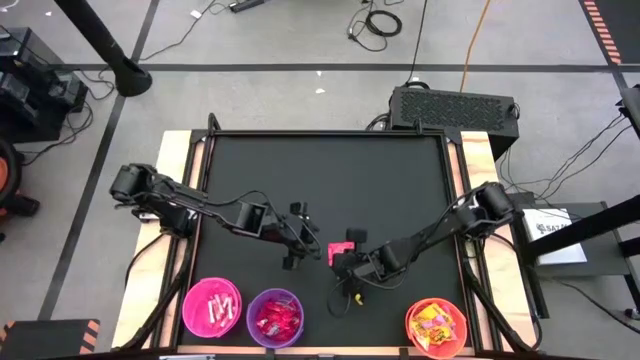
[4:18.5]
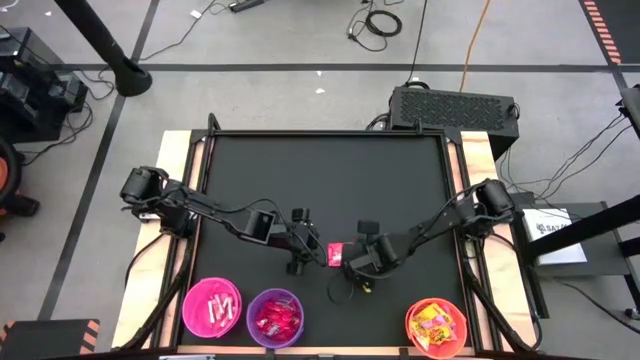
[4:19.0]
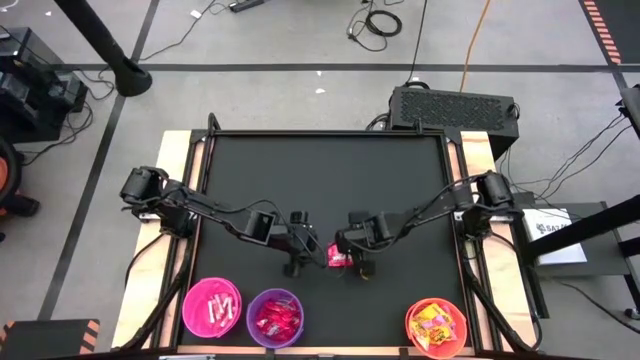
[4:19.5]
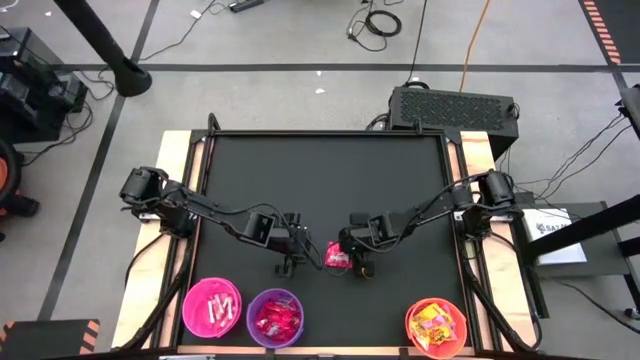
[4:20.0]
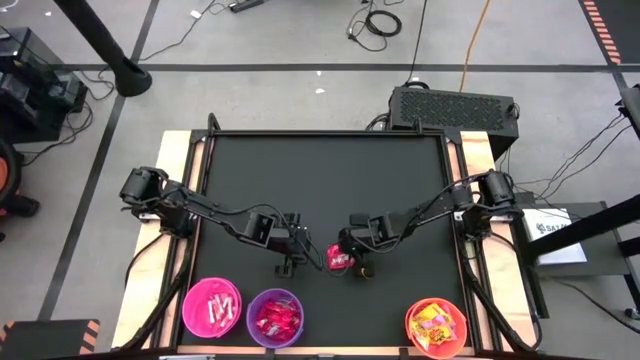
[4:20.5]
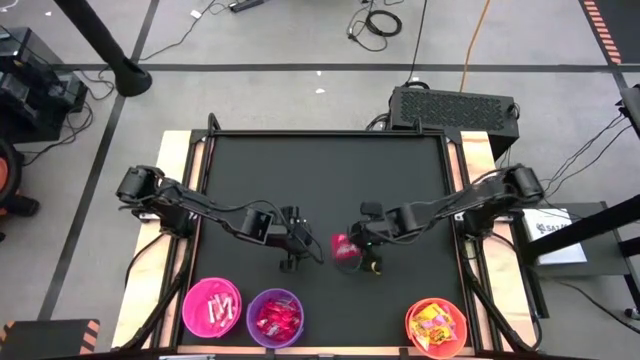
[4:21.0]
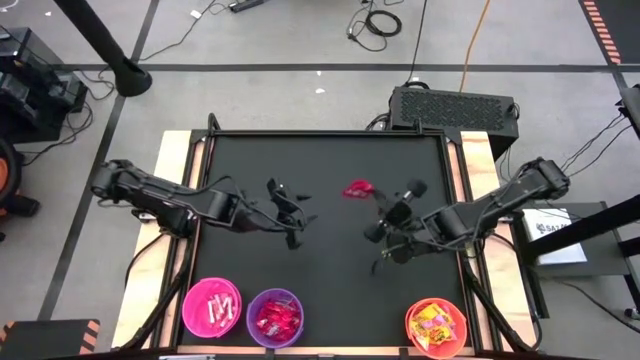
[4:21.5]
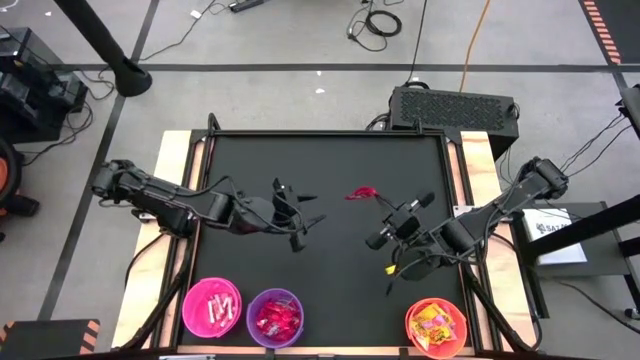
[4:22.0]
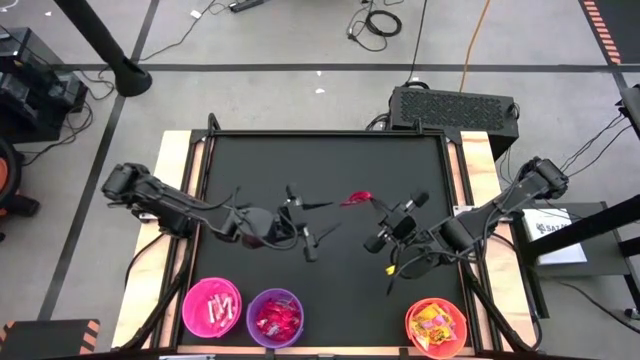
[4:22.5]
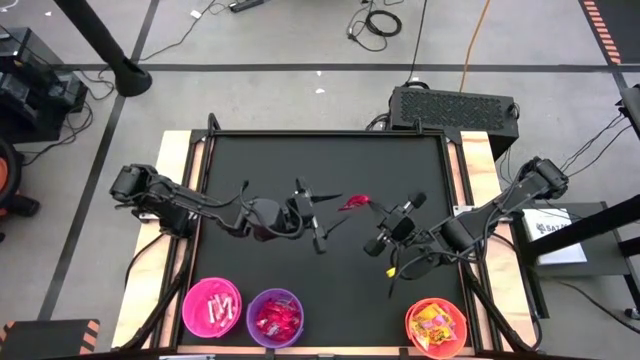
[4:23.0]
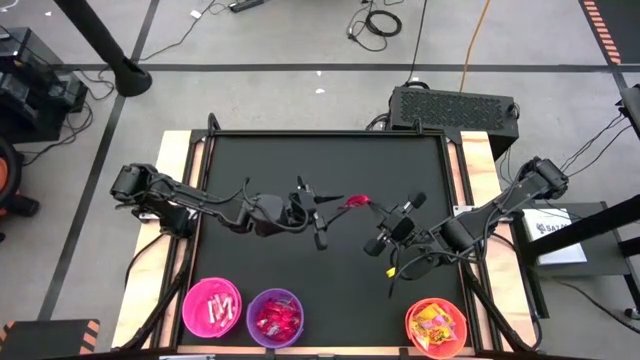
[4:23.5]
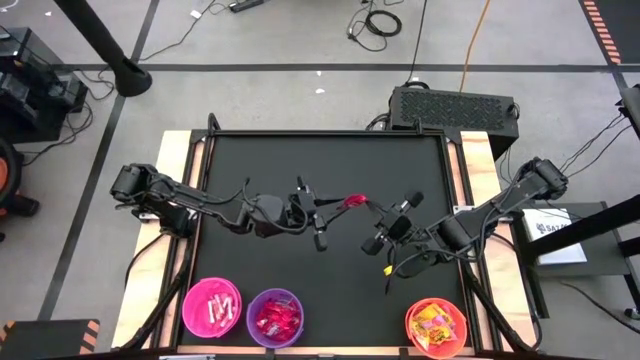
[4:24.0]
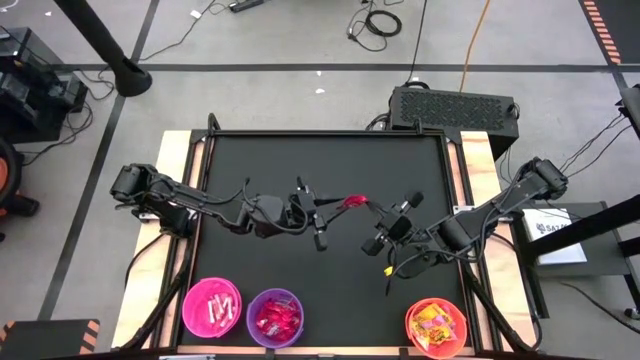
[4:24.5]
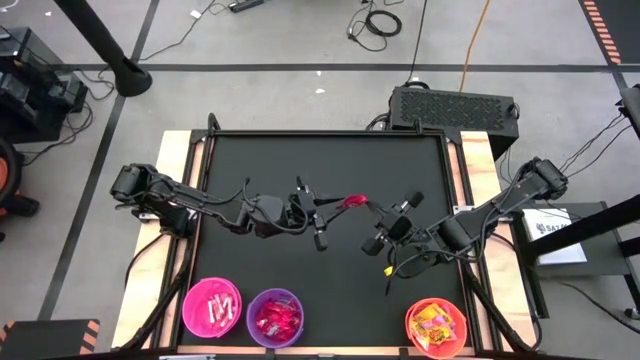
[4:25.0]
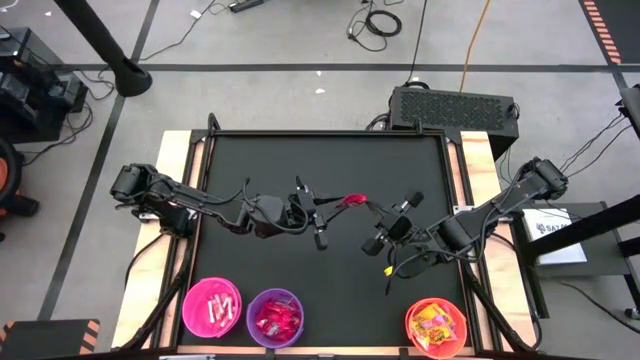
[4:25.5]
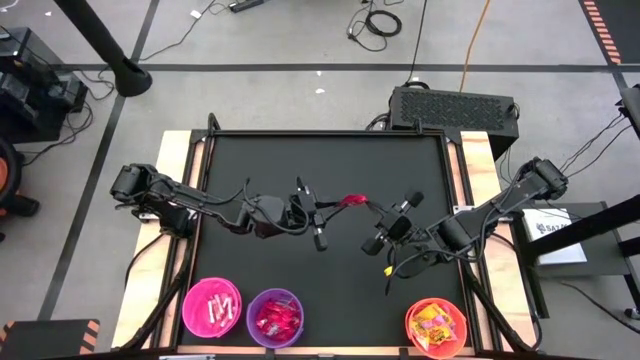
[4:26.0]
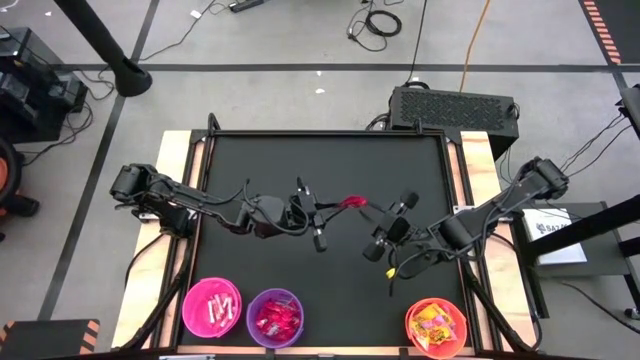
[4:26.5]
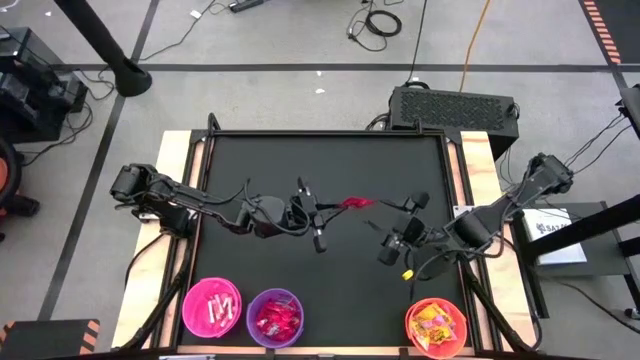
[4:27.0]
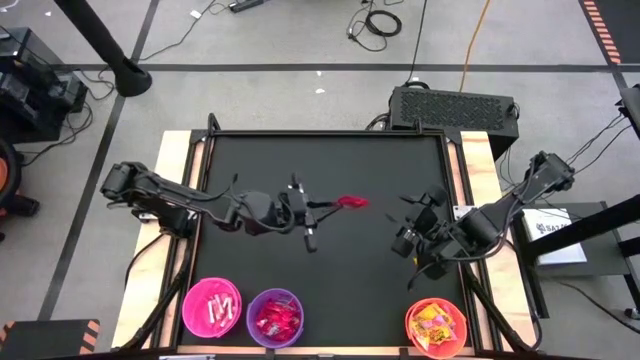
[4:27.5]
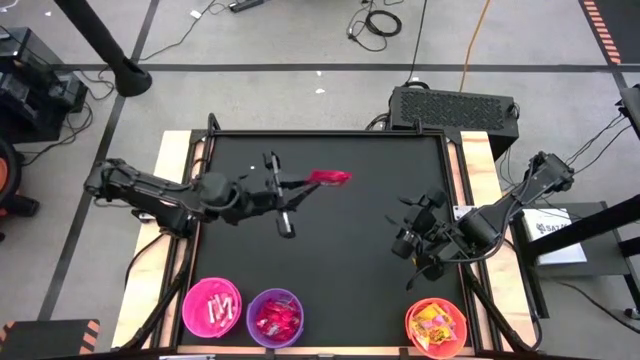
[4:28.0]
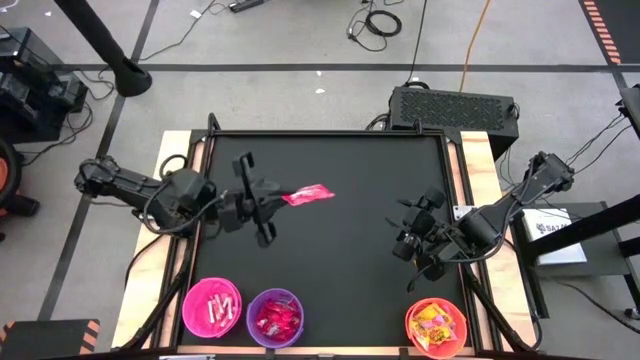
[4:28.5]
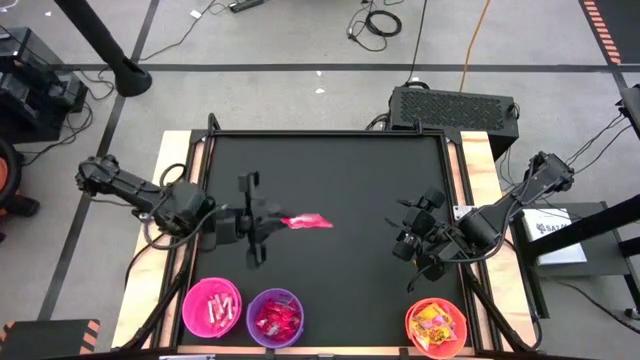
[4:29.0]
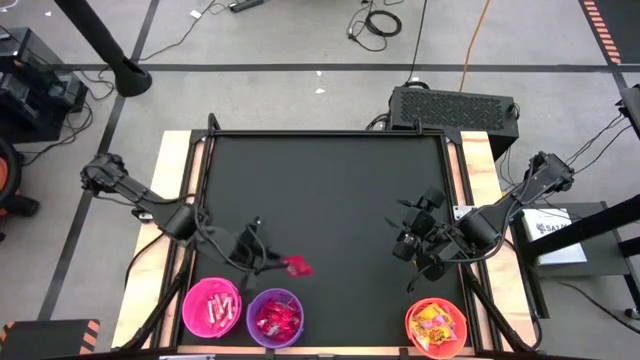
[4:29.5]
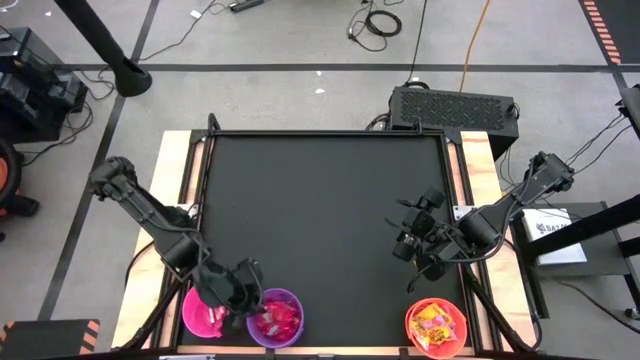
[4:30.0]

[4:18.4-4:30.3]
Task: Sort candy by brand, put in halloween buckets
Put the red candy into the violet bucket

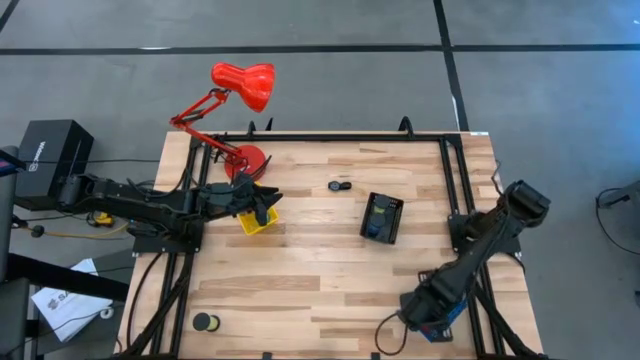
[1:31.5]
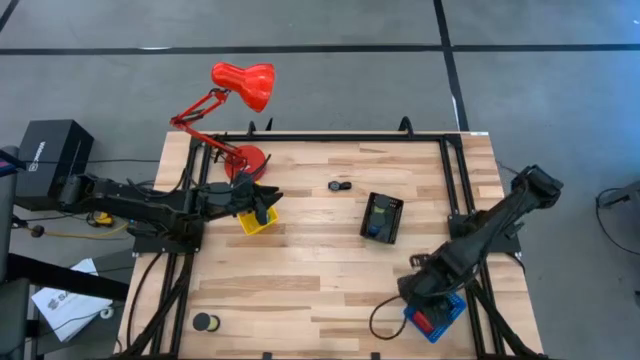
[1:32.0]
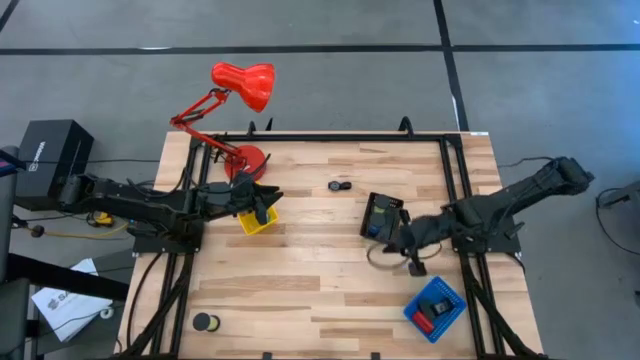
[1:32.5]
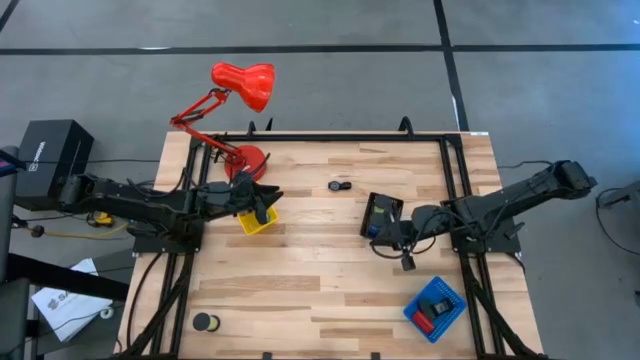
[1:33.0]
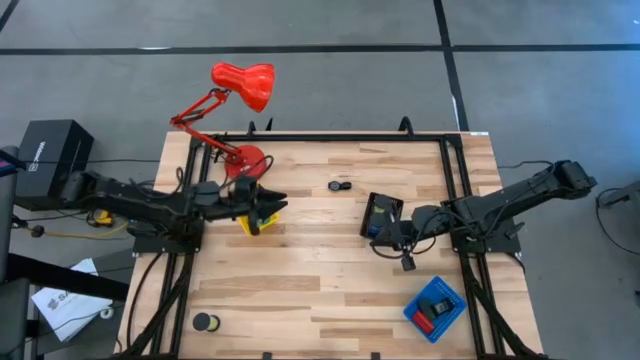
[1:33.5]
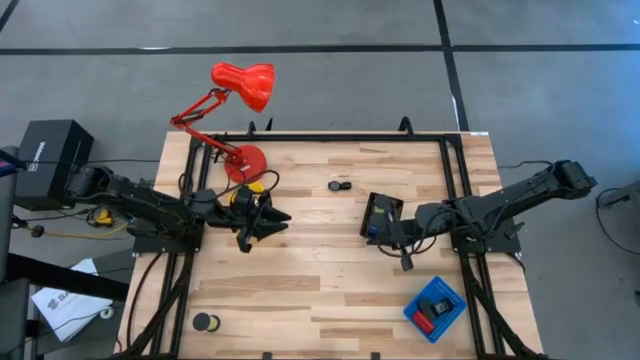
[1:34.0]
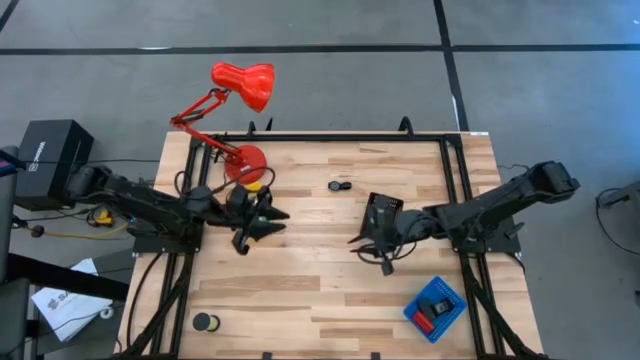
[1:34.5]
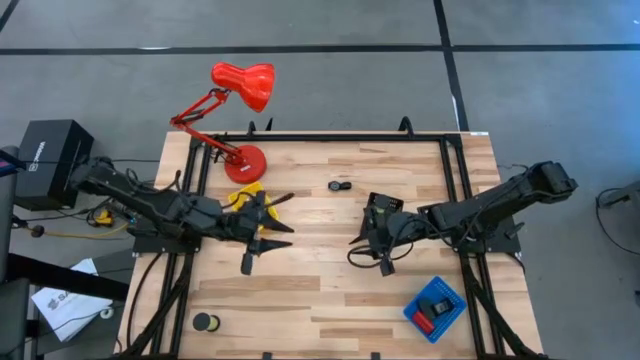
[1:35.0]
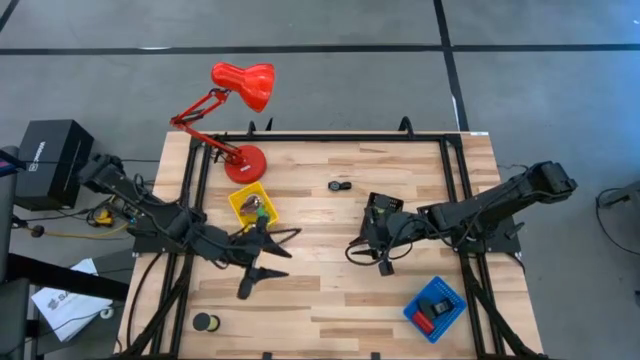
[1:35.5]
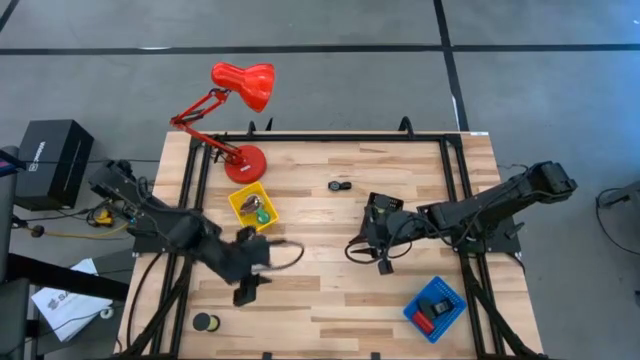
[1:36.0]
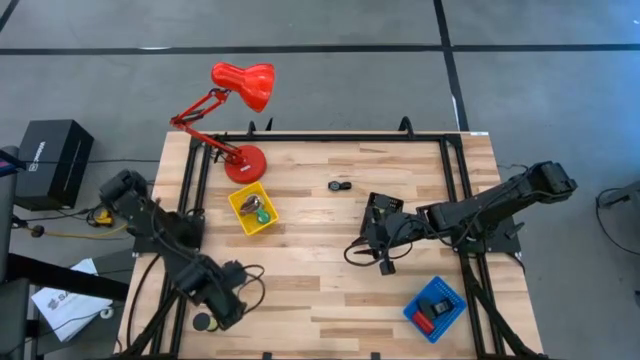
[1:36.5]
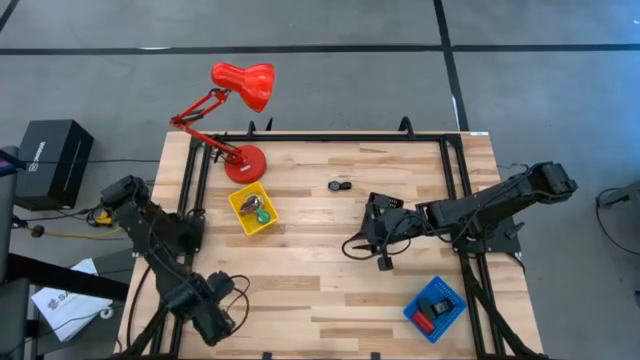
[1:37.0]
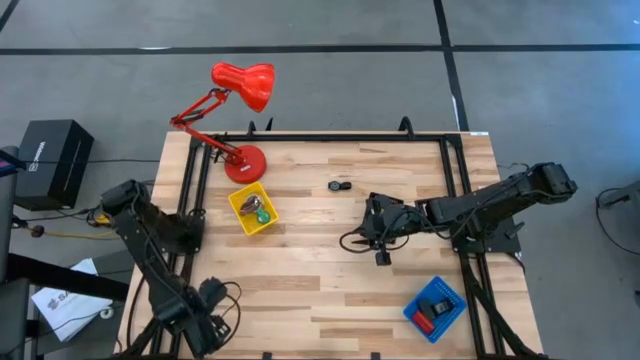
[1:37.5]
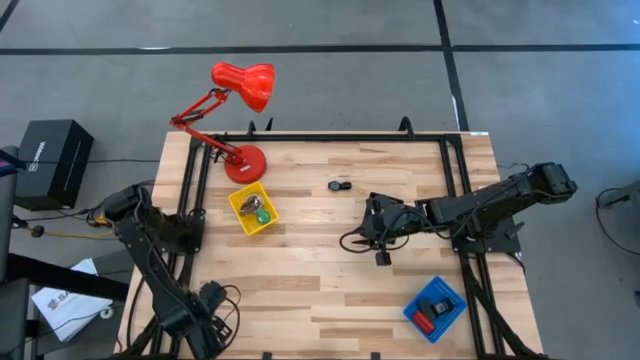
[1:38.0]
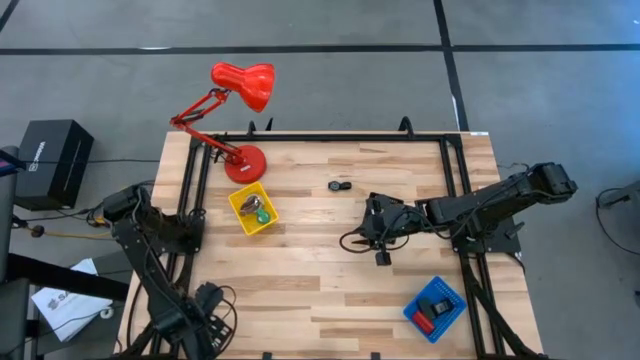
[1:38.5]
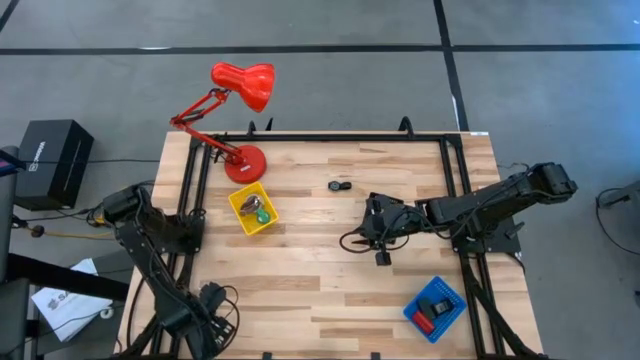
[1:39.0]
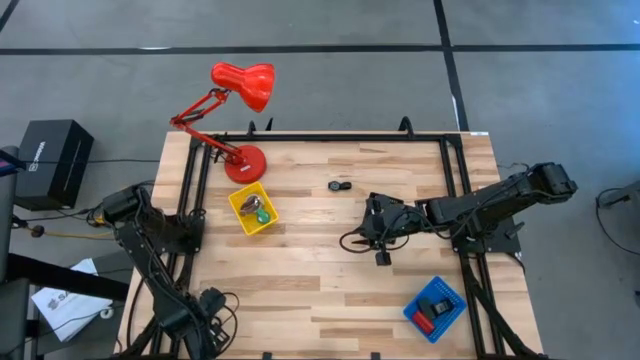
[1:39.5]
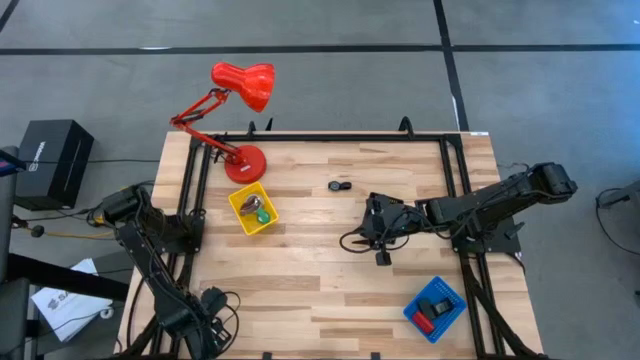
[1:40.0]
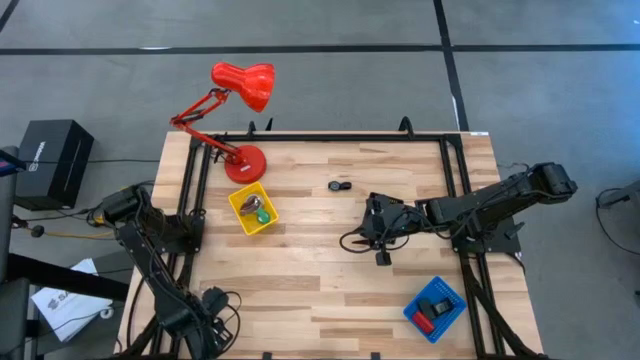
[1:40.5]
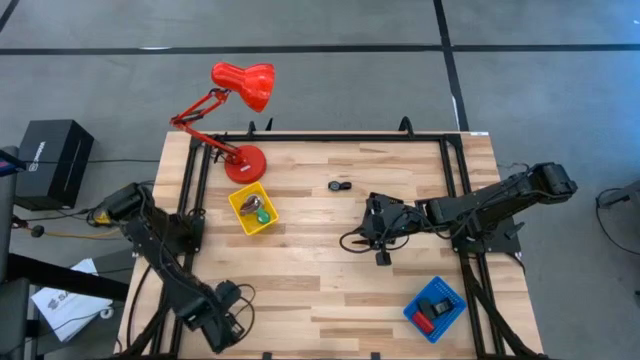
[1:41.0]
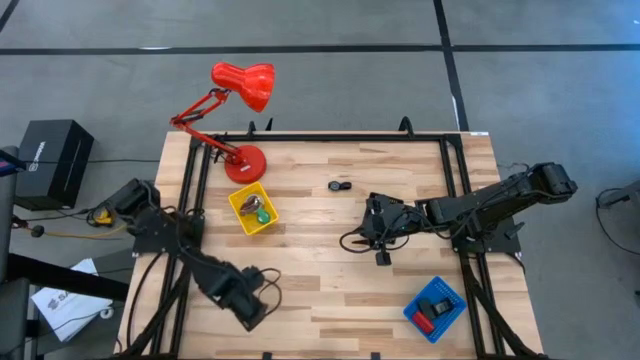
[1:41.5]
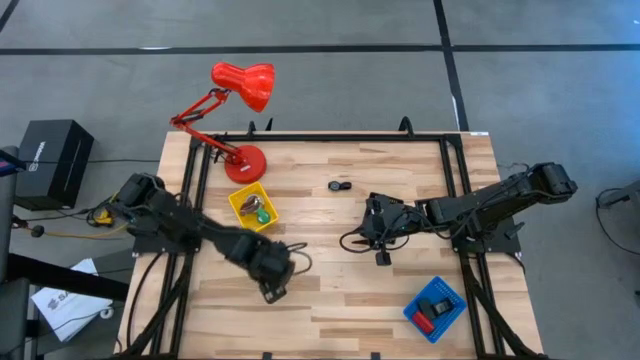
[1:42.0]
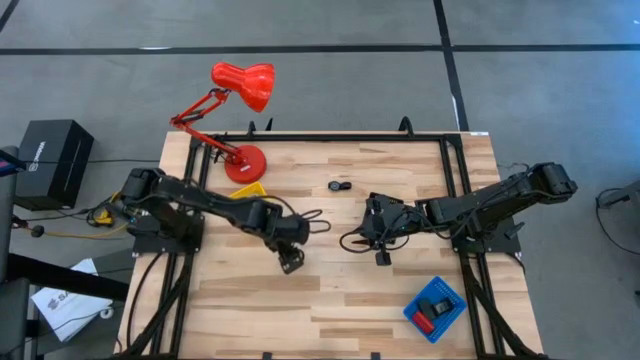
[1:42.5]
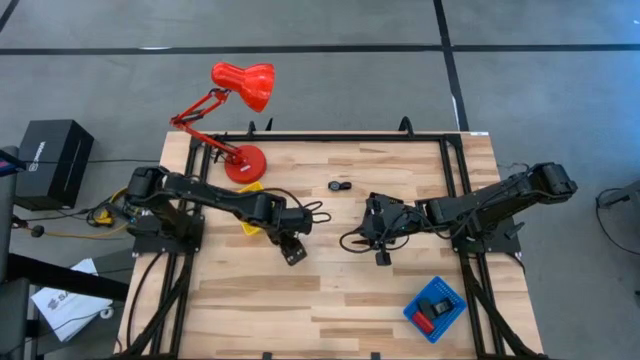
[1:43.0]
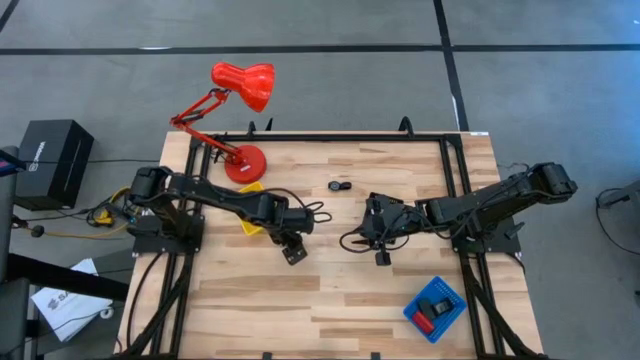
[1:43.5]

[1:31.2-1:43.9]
Task: Pick & Place Office items
Move the green hourglass to the center of the table
